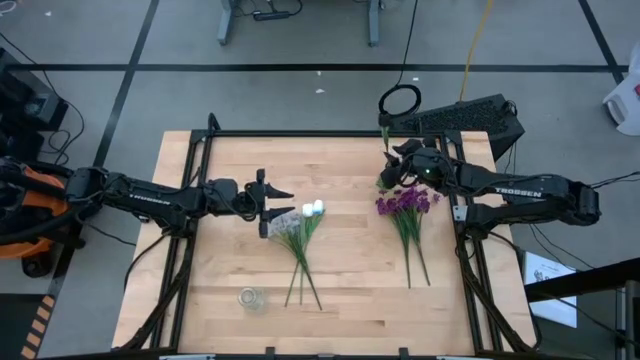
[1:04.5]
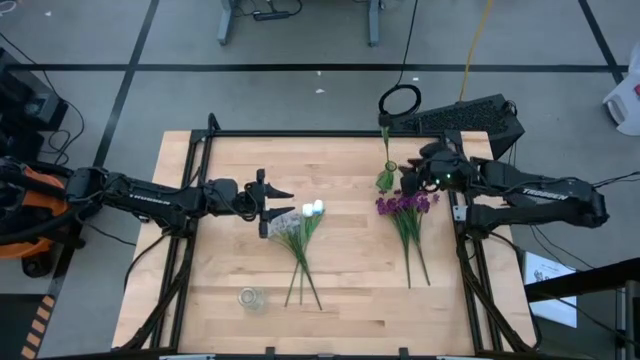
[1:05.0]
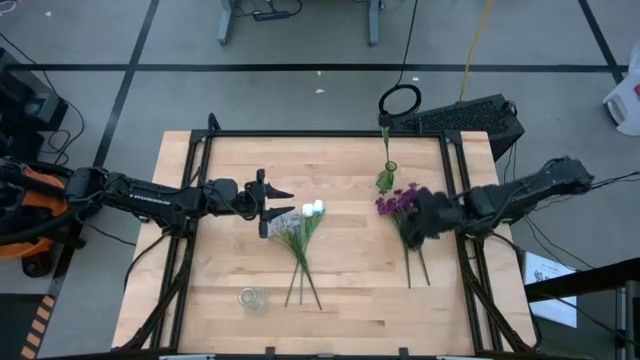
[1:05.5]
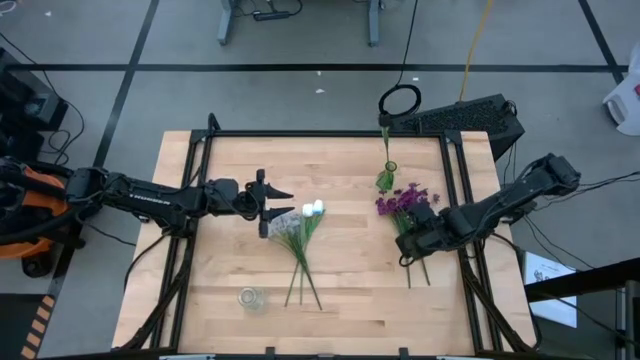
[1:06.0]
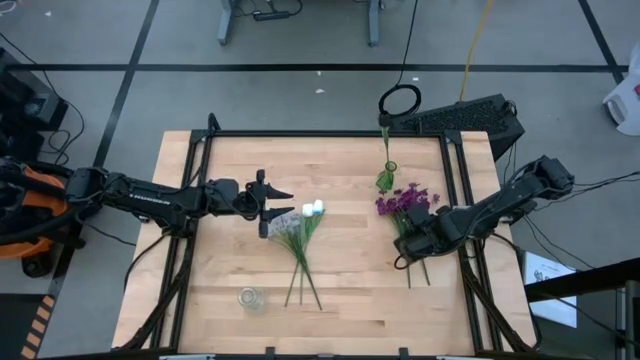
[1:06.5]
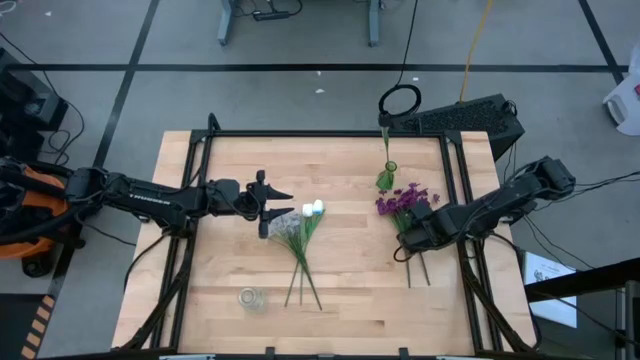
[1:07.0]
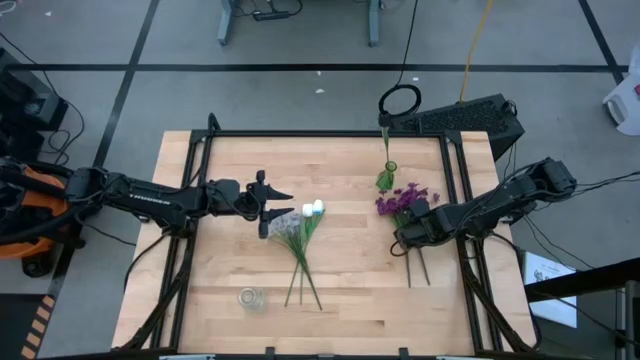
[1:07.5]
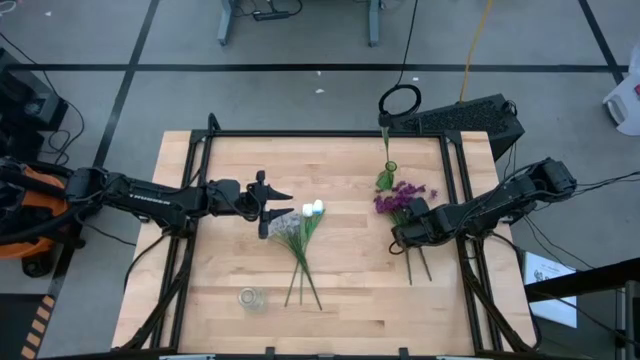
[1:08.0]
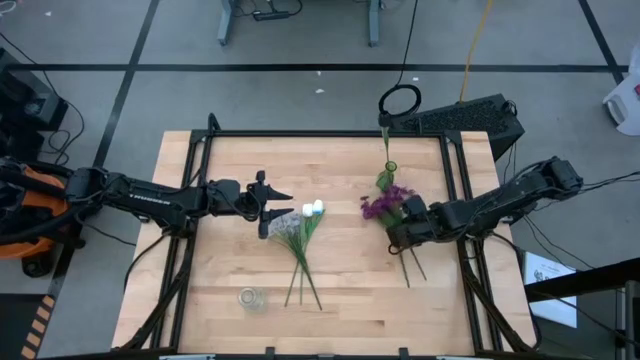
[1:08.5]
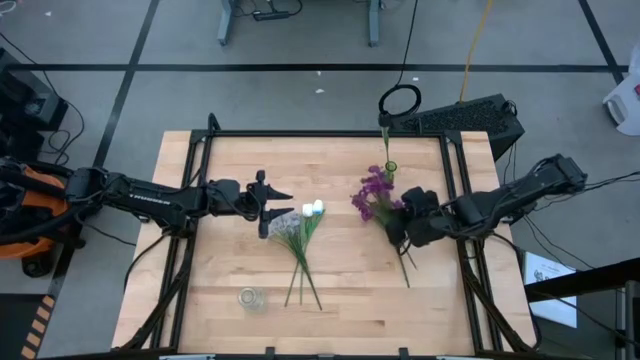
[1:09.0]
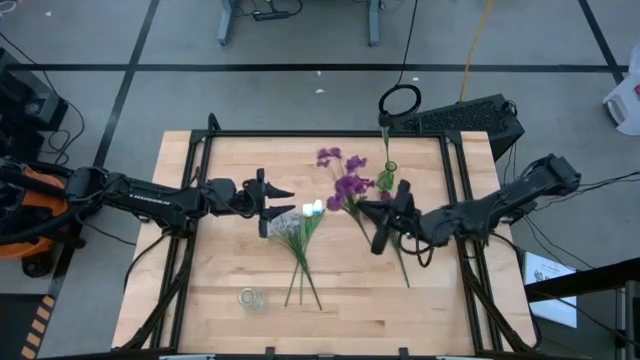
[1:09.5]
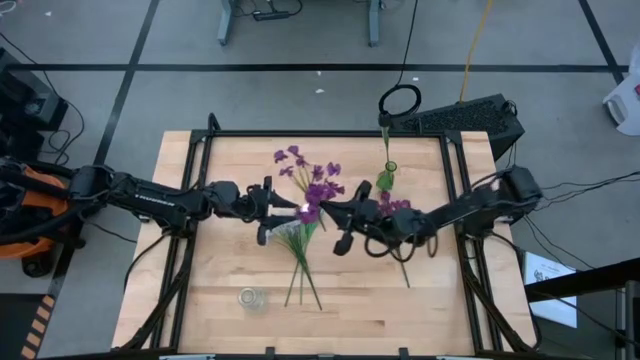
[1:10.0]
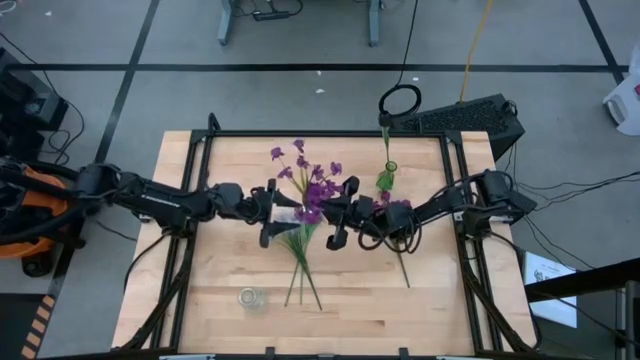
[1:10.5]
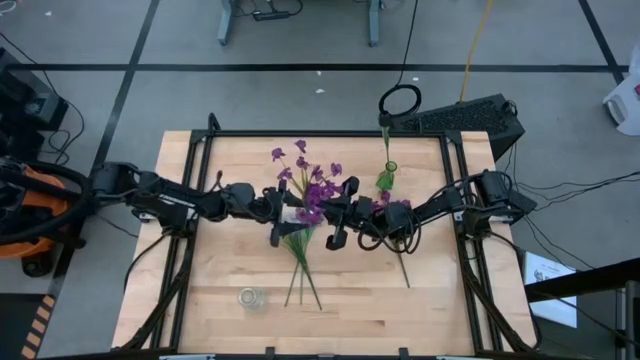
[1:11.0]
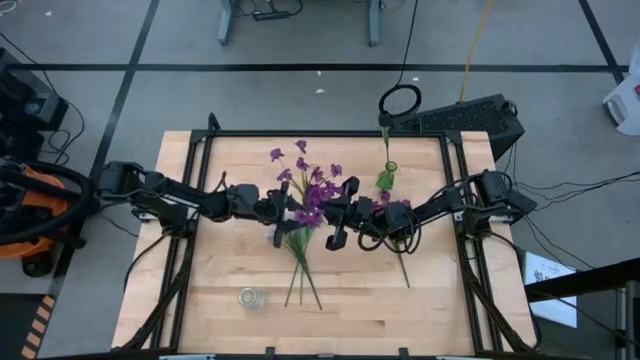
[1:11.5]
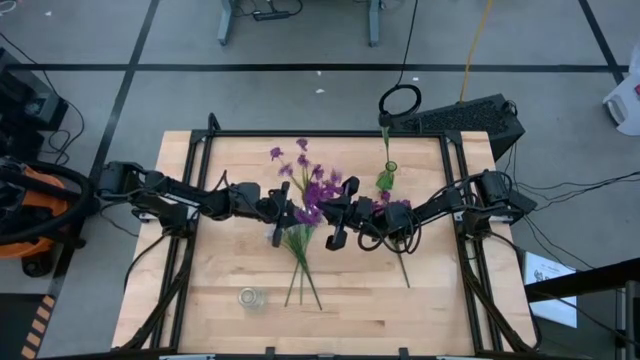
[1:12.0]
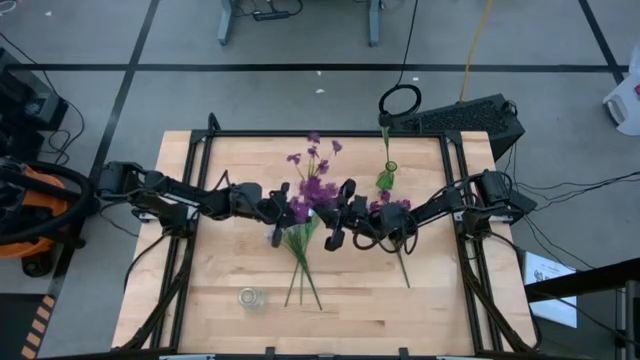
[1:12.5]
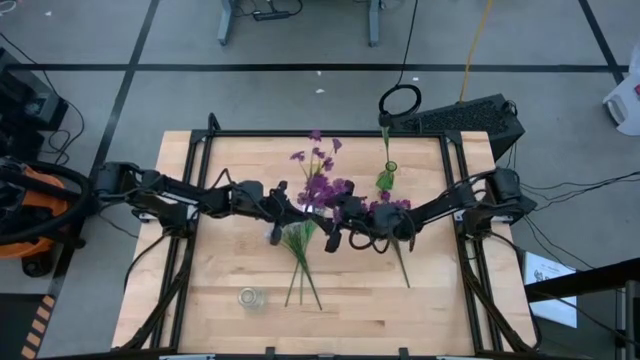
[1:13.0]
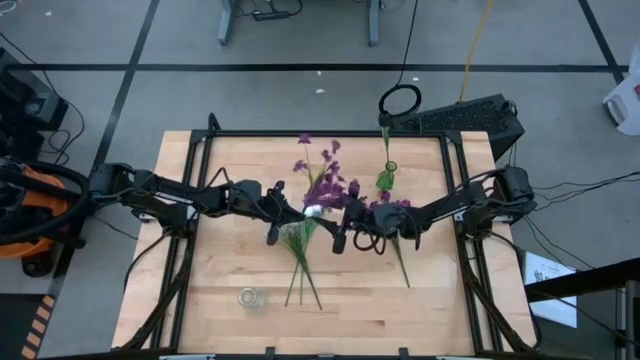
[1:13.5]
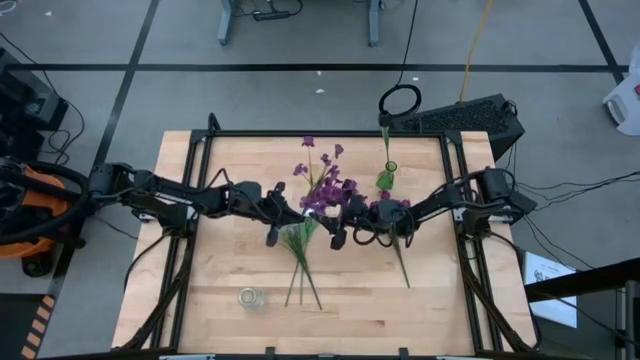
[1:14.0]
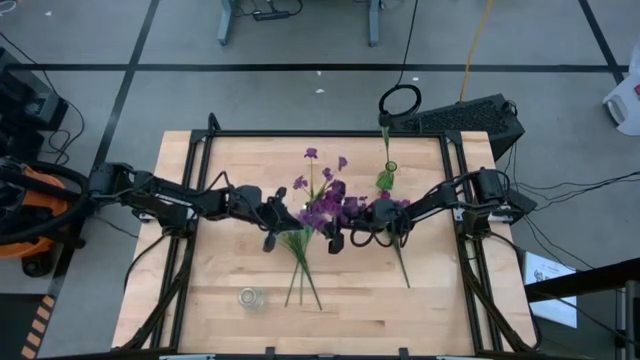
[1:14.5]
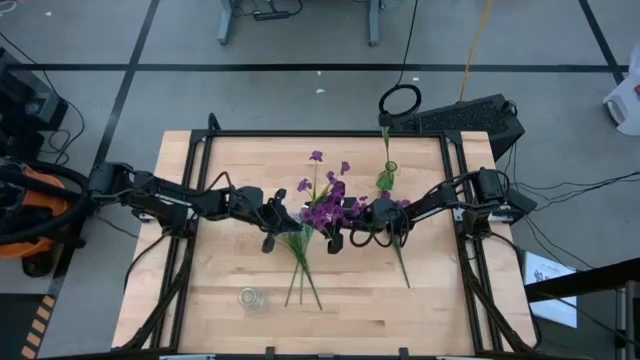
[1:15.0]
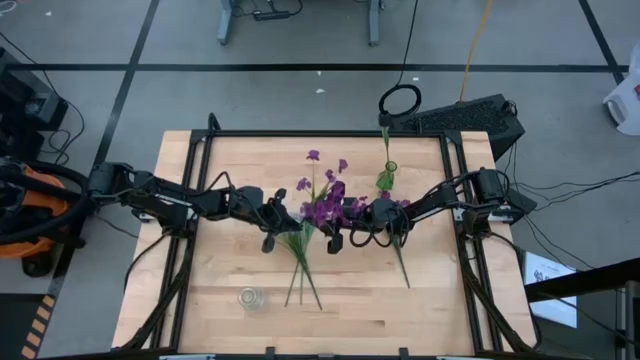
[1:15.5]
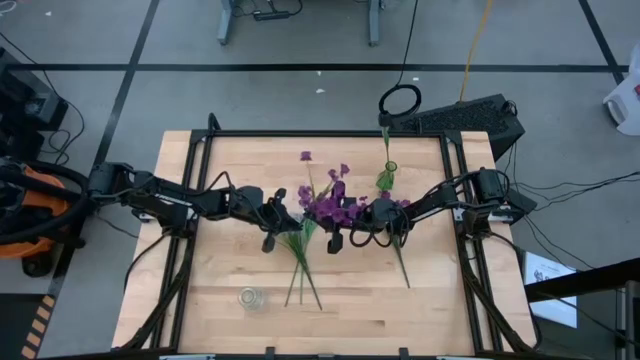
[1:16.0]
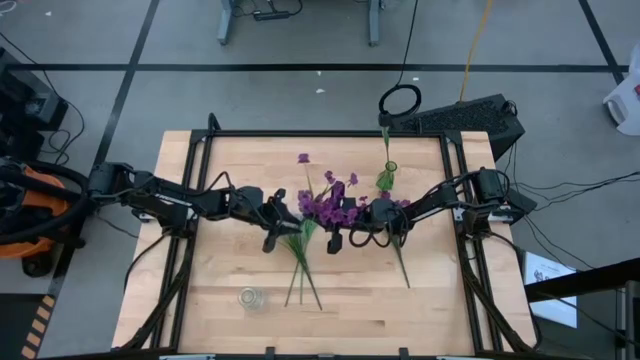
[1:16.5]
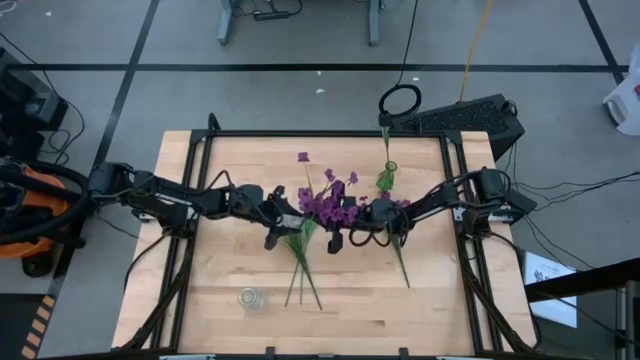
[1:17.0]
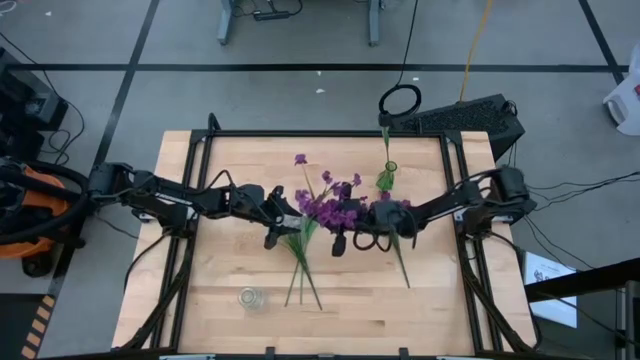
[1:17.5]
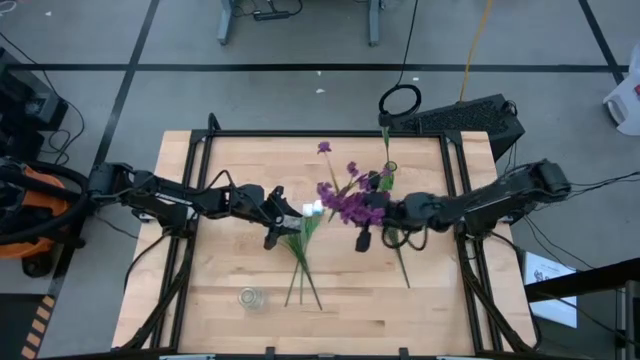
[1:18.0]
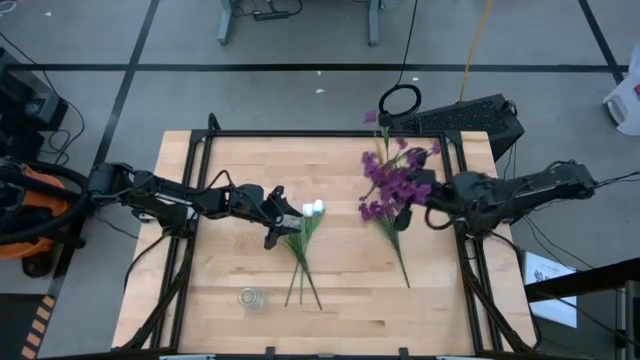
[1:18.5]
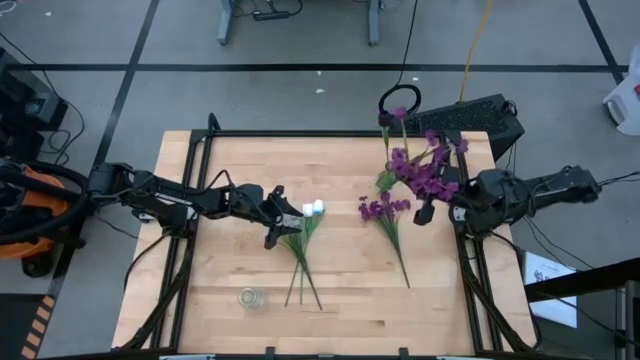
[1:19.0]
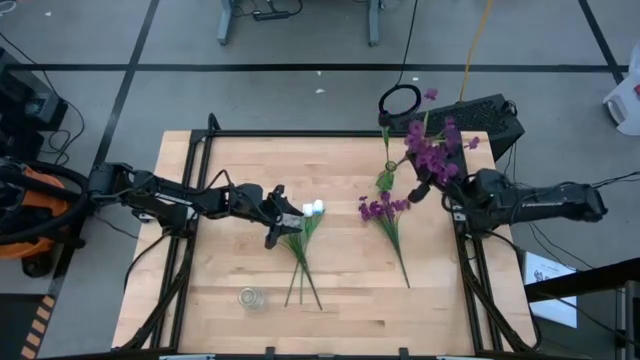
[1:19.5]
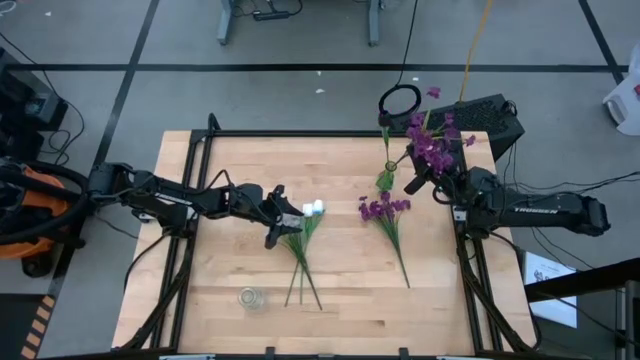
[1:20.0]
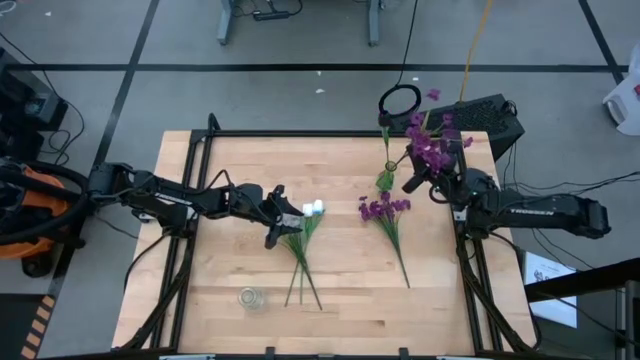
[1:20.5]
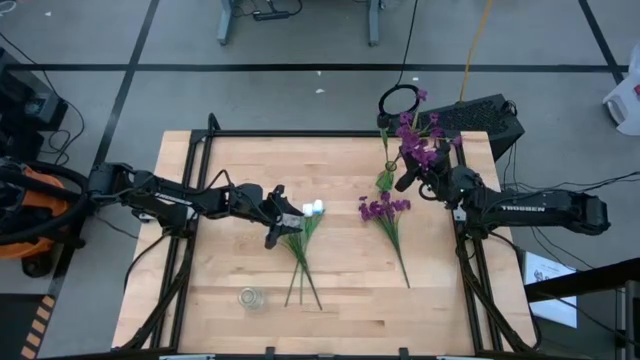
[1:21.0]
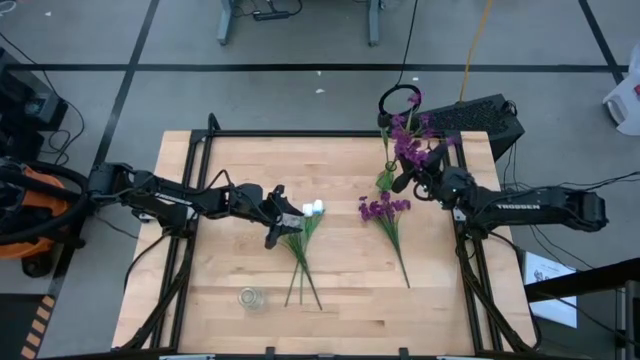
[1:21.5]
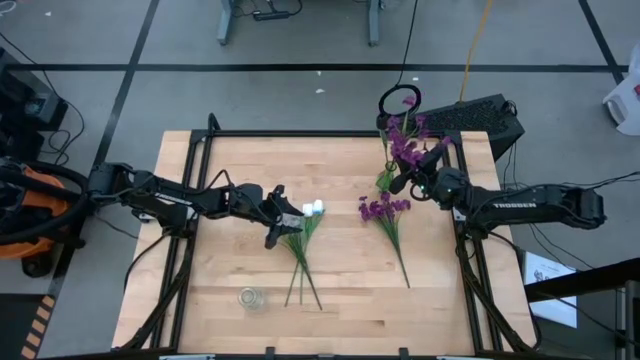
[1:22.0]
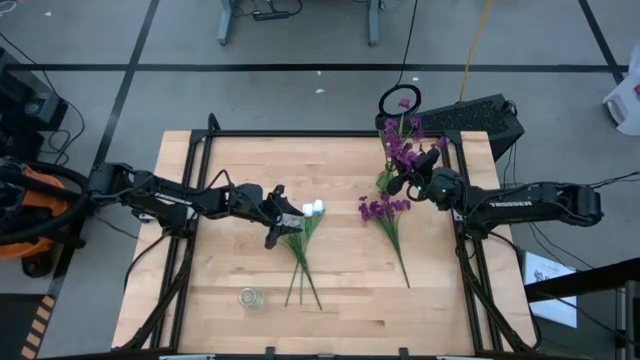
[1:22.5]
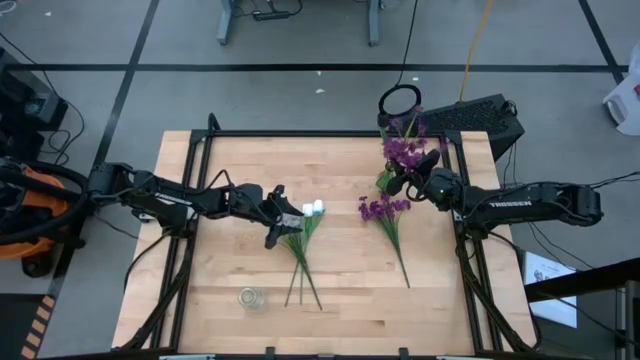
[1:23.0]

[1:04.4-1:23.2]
Task: Sort flowers into vase by color
Put the right violet flower into the green vase

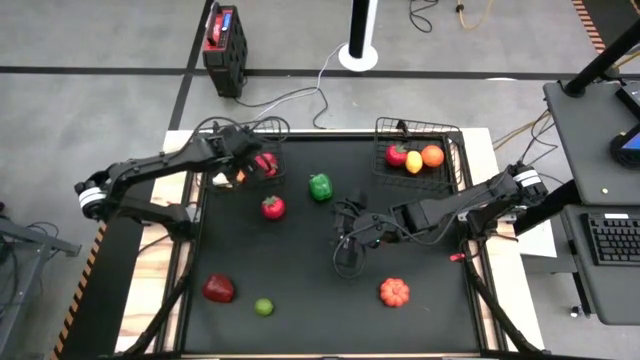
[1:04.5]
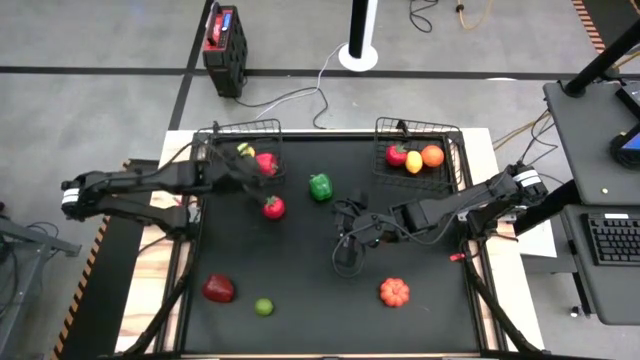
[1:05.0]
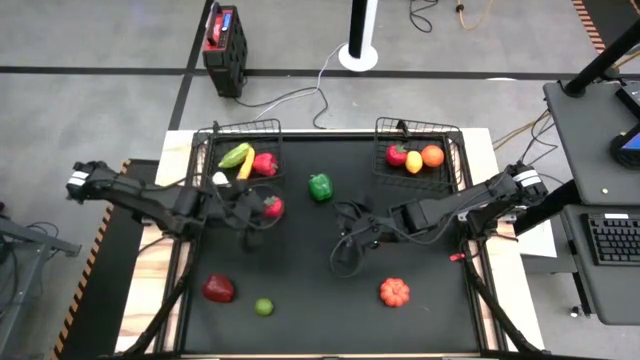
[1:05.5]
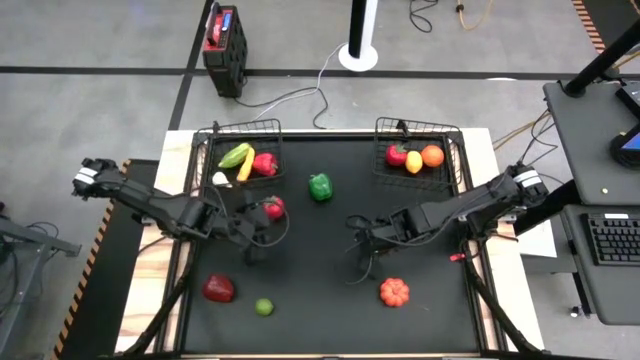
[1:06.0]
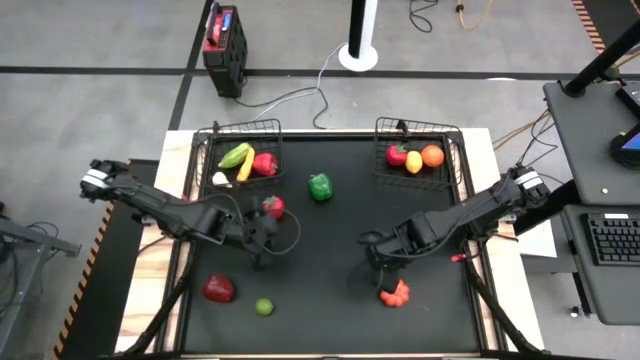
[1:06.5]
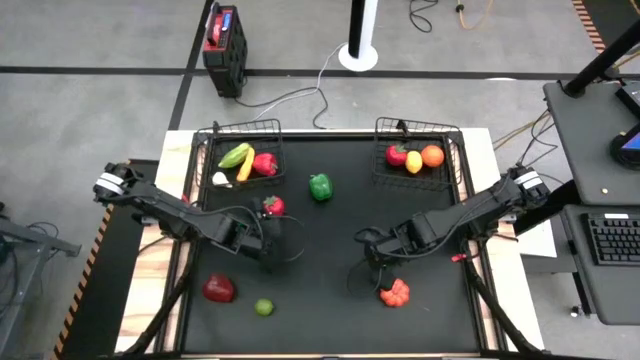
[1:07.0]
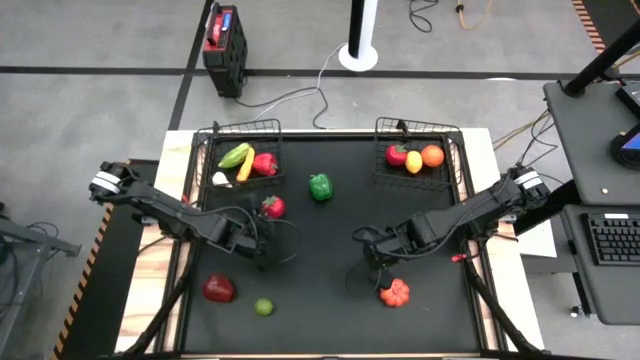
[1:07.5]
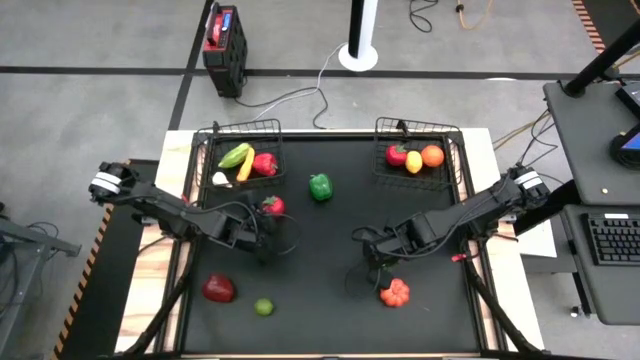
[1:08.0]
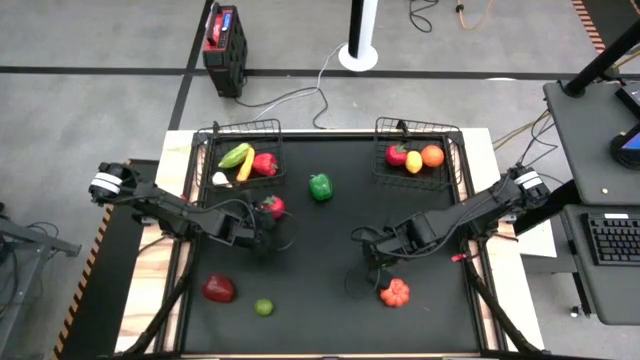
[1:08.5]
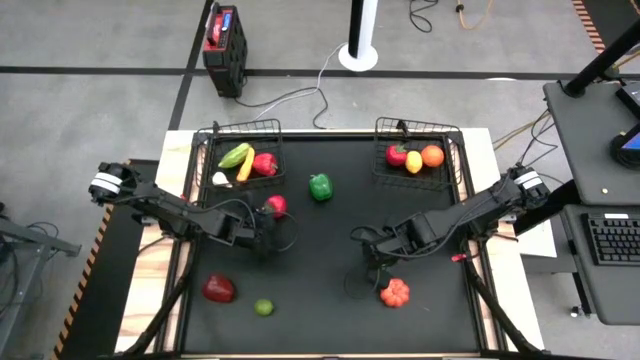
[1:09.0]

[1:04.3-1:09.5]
Task: Sort produce into baskets
Put the tomato into the right wire basket
